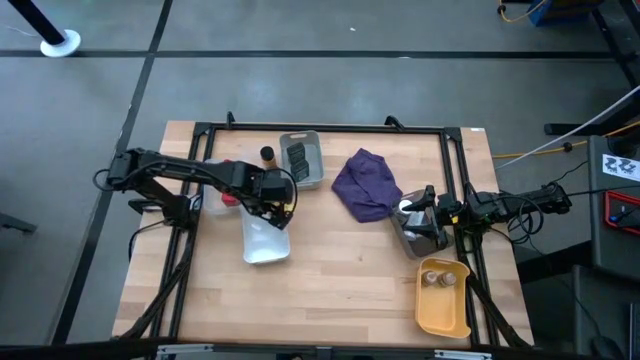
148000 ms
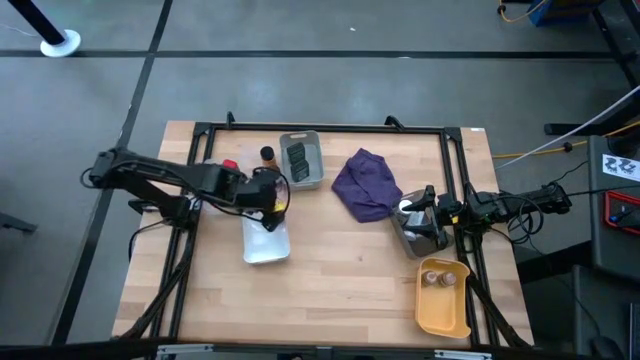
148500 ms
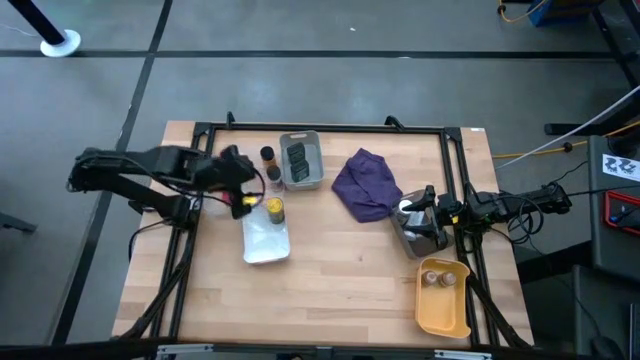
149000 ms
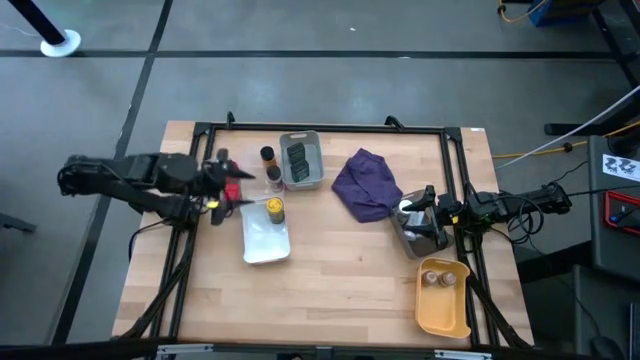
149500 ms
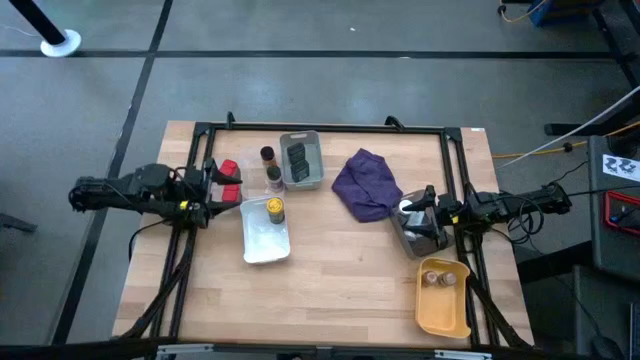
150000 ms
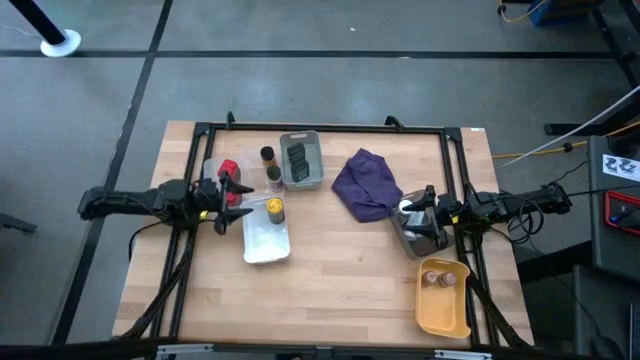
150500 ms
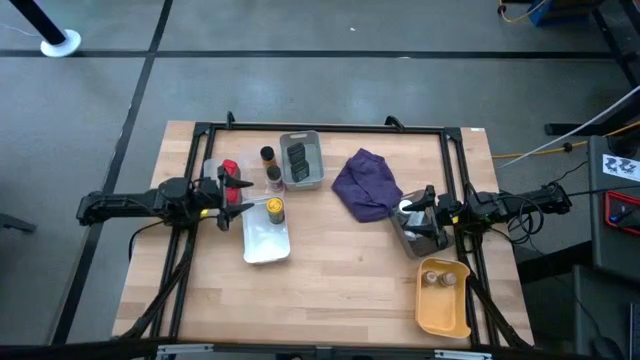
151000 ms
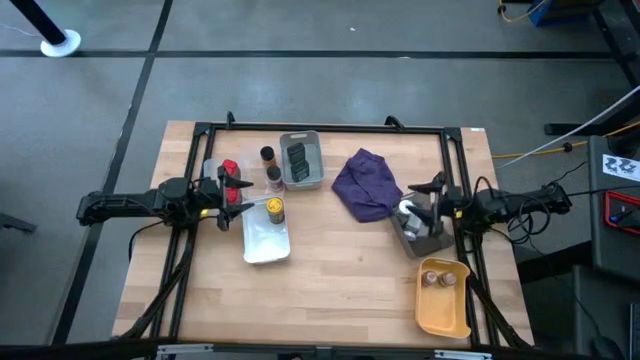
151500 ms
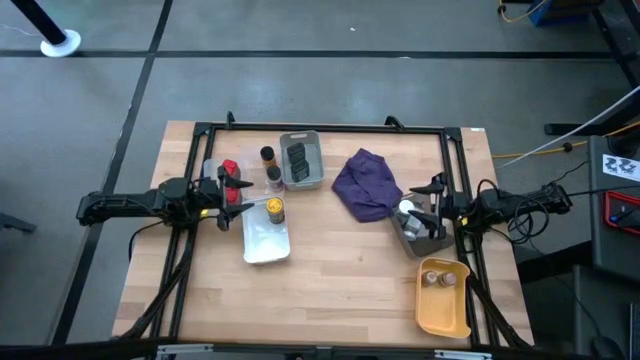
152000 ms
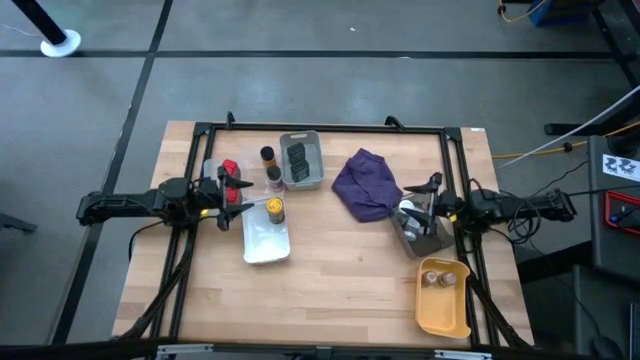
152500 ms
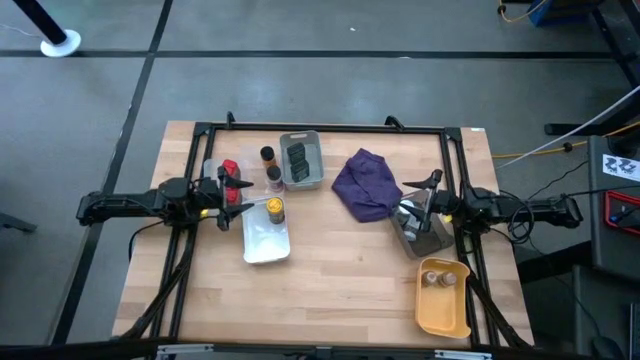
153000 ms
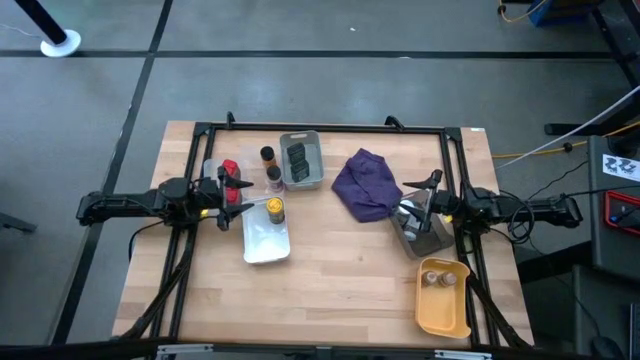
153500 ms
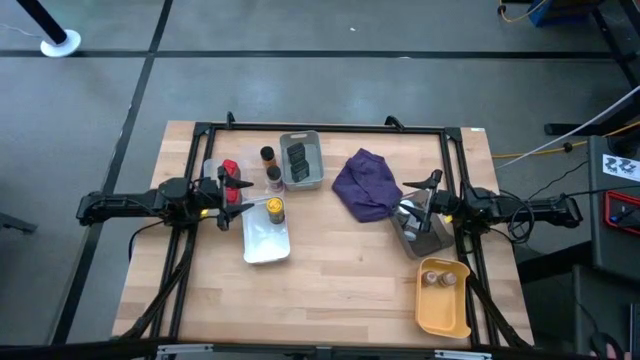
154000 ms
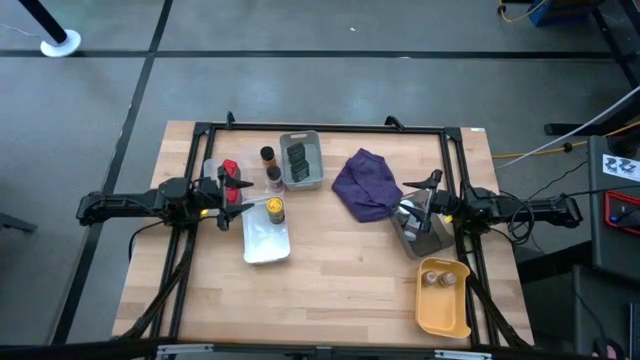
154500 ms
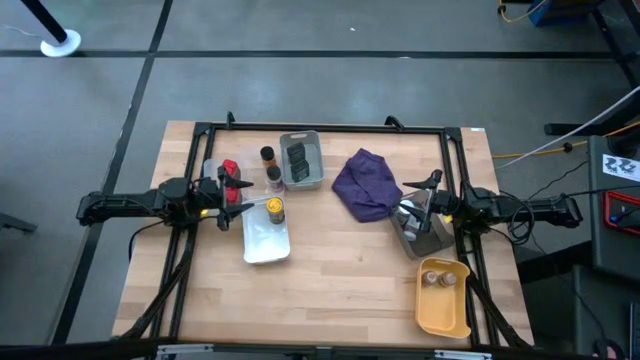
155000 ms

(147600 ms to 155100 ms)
Task: Sort spices by type
Return to Home Position

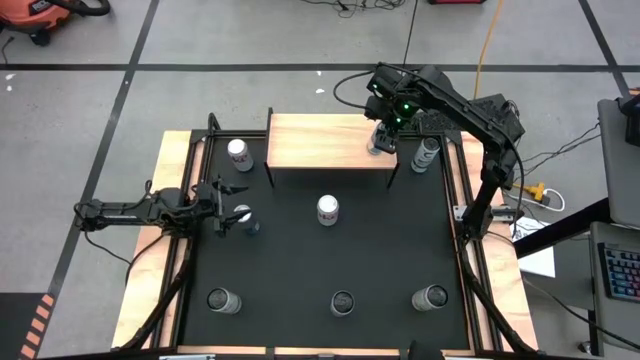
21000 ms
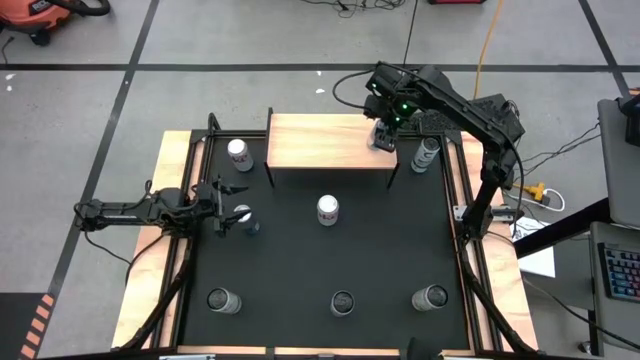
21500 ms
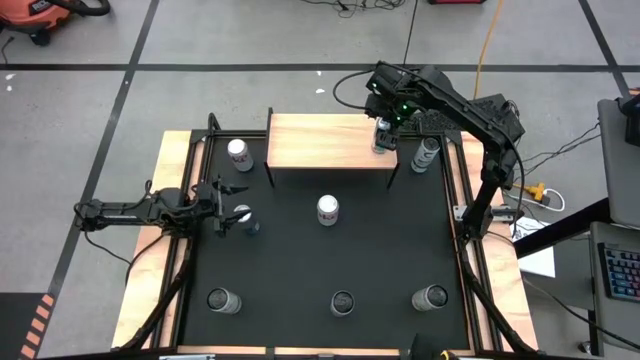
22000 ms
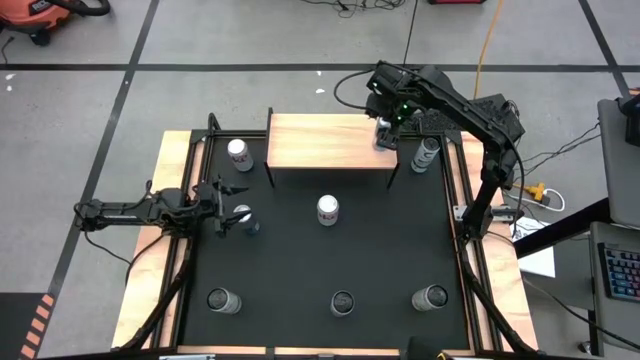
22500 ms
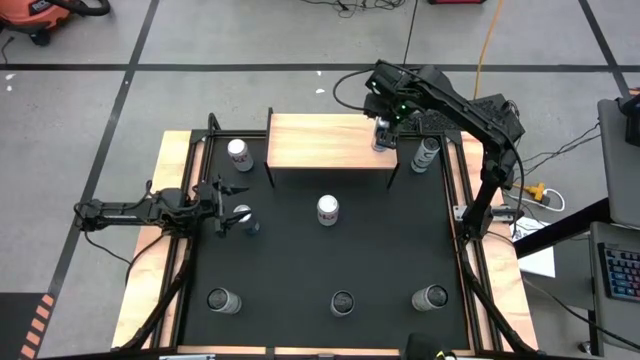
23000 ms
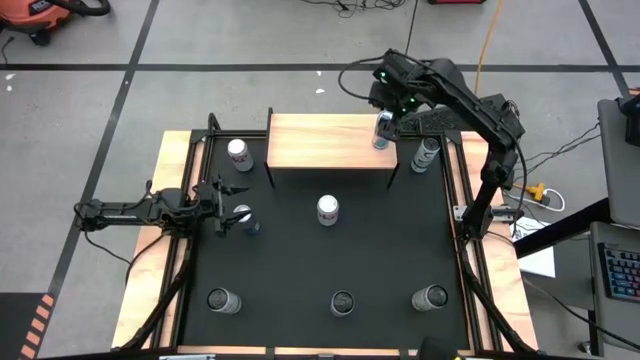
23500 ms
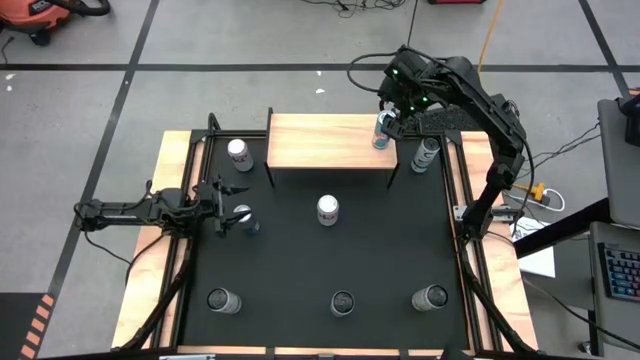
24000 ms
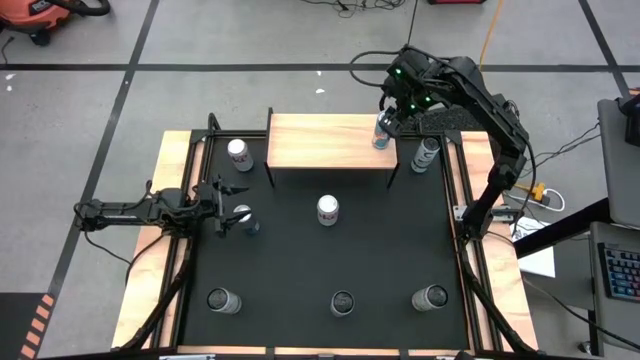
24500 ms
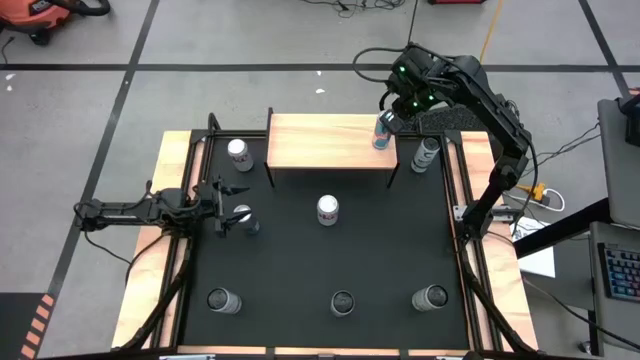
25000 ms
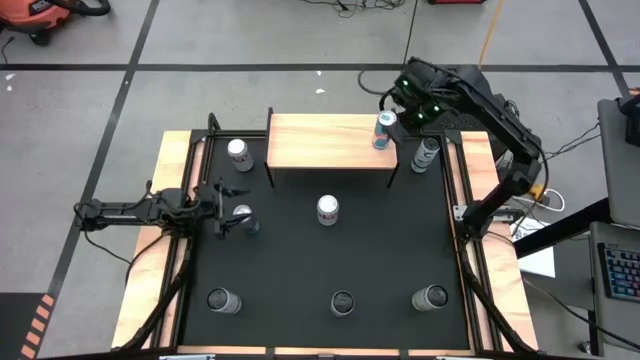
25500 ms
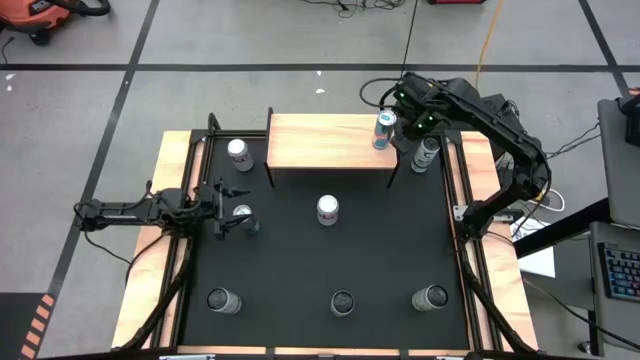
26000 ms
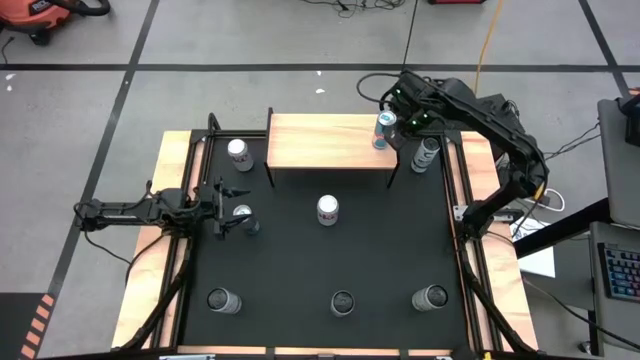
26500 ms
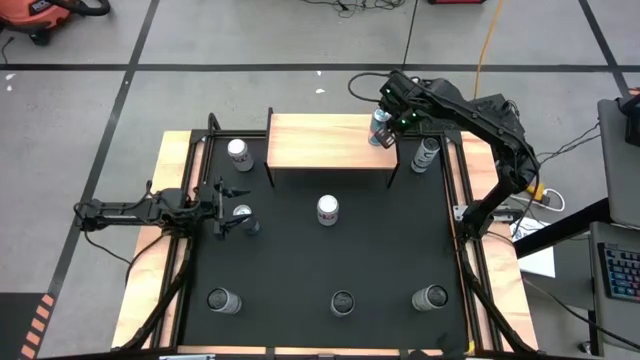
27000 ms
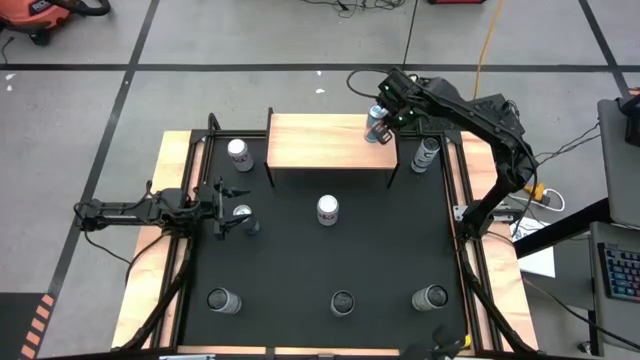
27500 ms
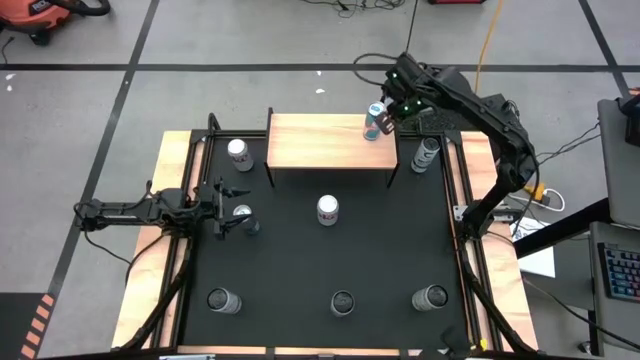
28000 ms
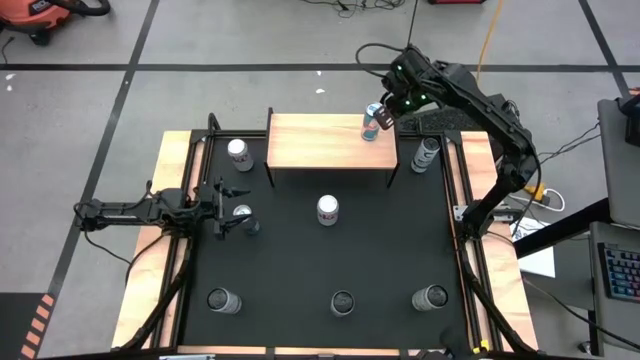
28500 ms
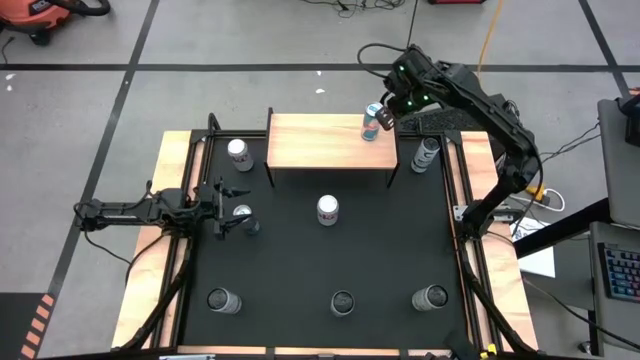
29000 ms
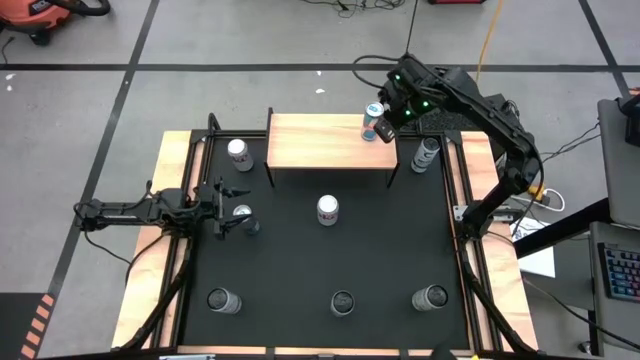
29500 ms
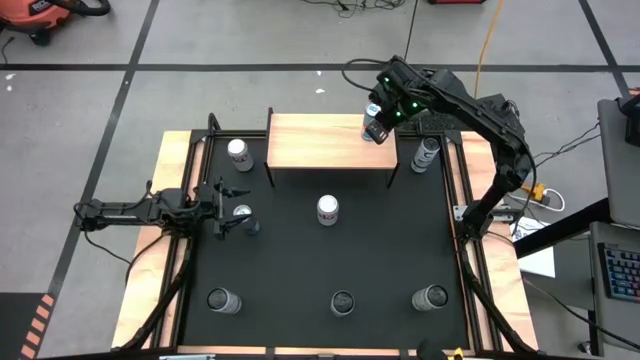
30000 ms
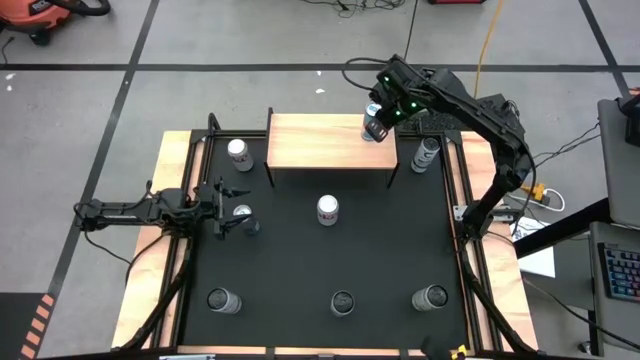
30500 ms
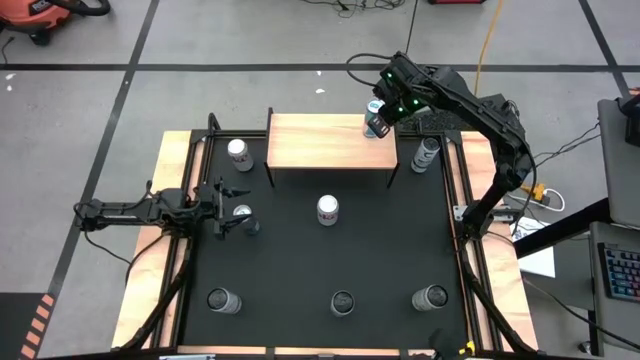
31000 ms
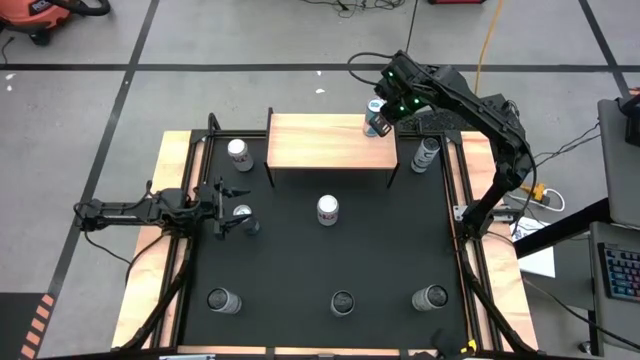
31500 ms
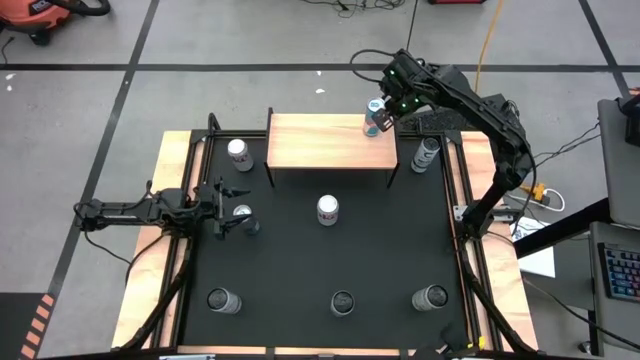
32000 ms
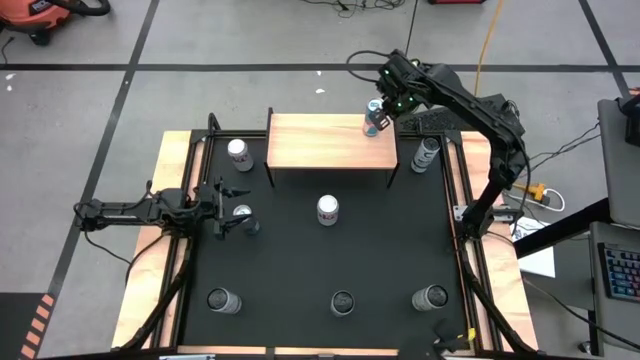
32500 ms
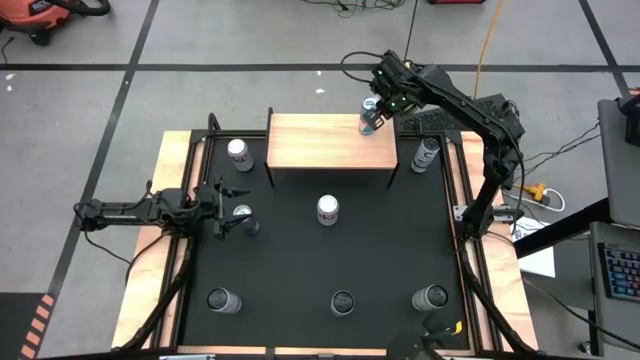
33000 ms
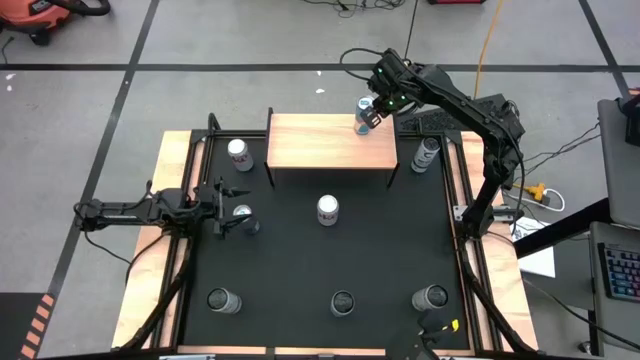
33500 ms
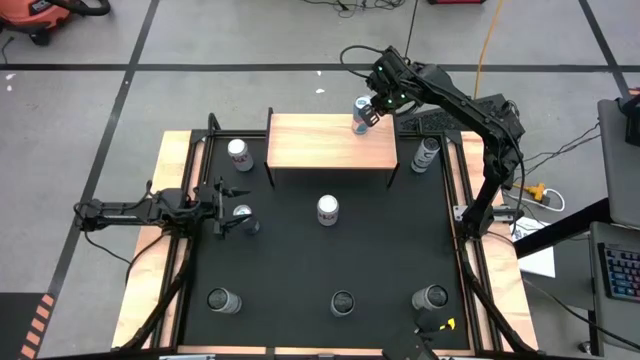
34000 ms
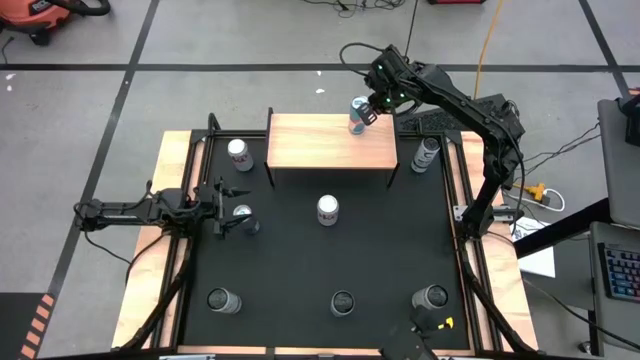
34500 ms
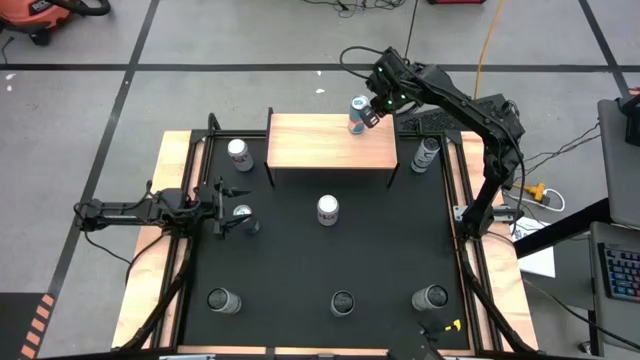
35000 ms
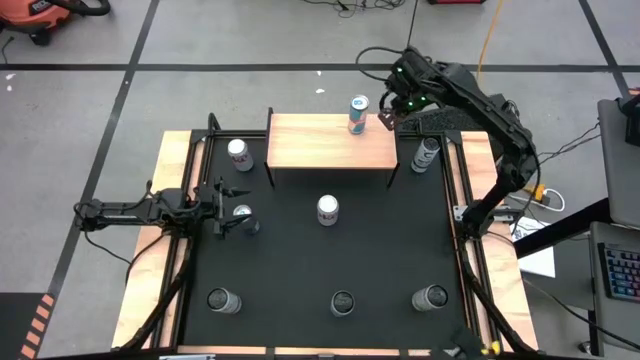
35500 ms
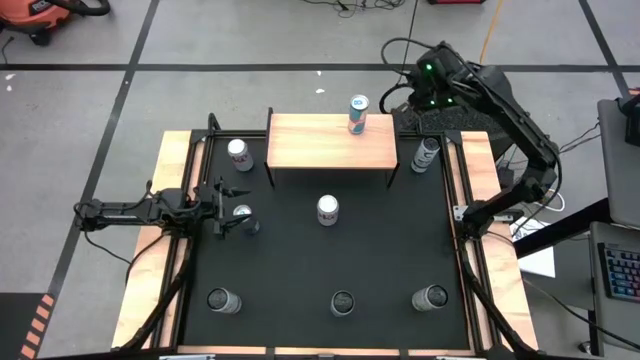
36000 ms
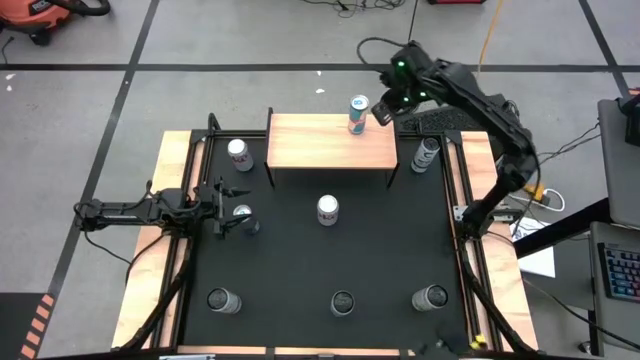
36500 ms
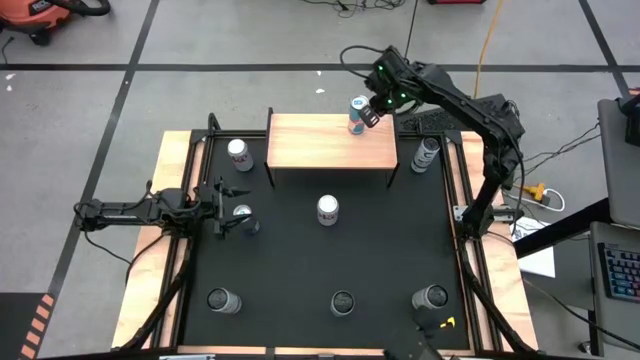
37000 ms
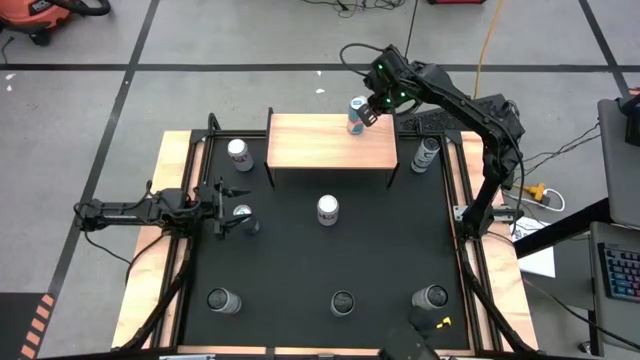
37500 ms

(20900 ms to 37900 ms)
Task: Place canned beverage on shelf
Put the right blue soda can on the shelf
